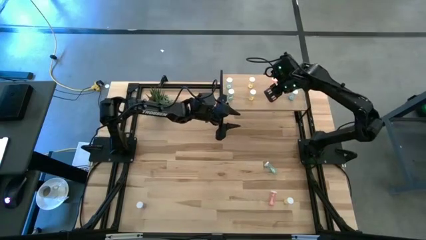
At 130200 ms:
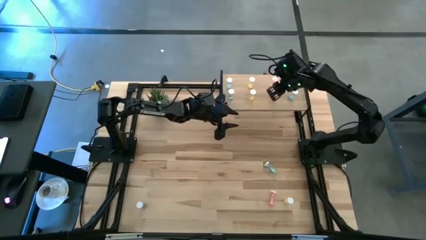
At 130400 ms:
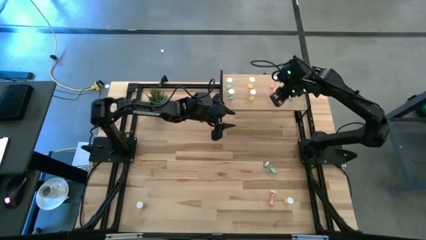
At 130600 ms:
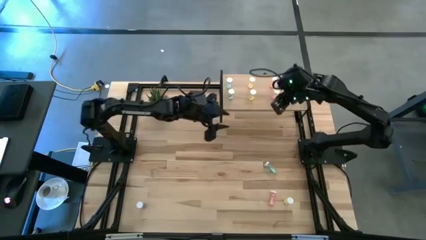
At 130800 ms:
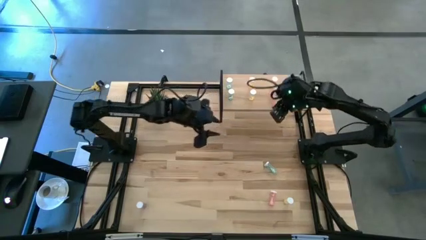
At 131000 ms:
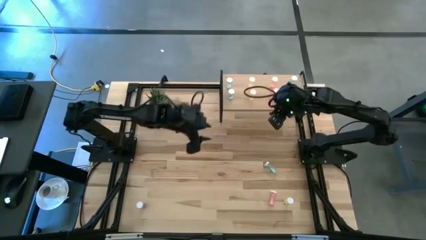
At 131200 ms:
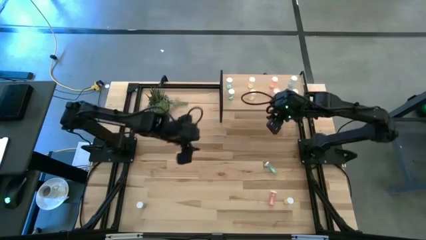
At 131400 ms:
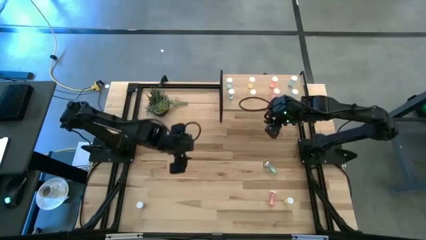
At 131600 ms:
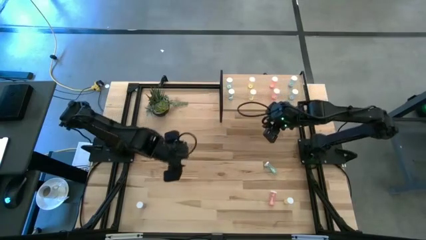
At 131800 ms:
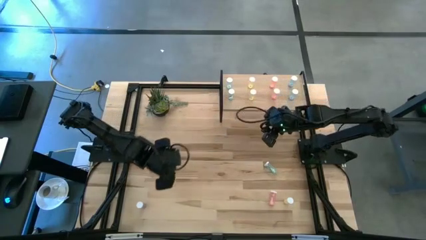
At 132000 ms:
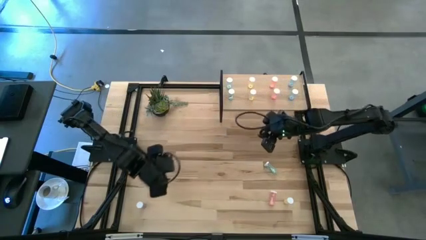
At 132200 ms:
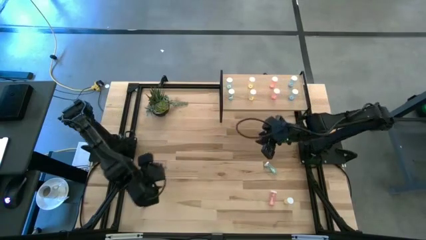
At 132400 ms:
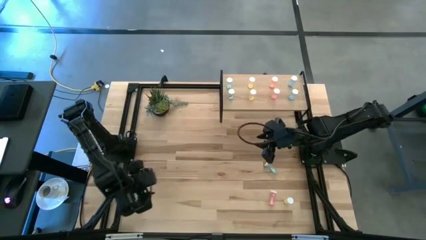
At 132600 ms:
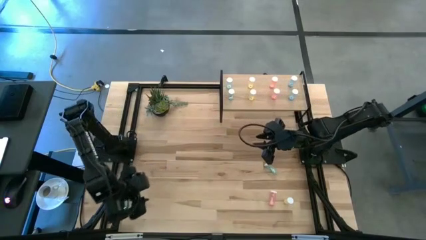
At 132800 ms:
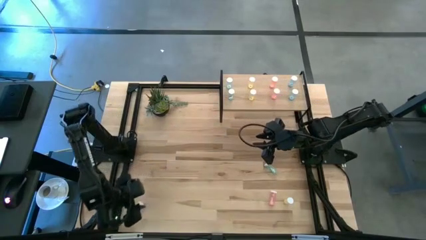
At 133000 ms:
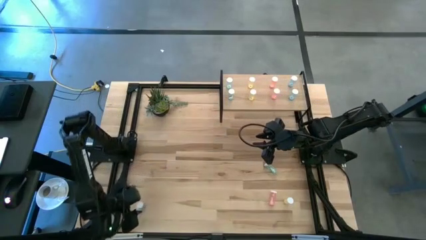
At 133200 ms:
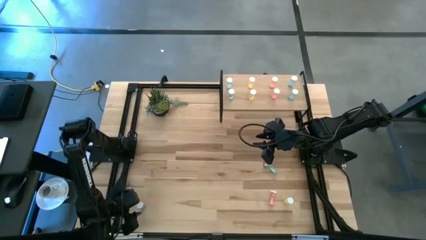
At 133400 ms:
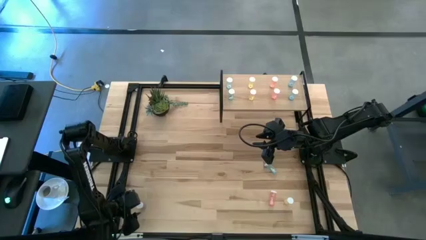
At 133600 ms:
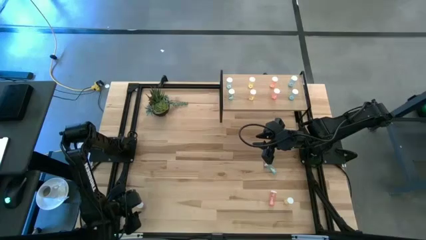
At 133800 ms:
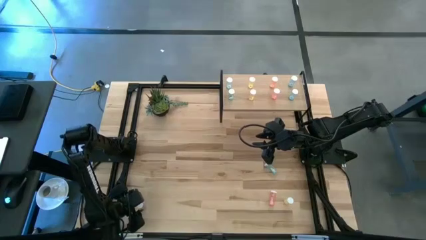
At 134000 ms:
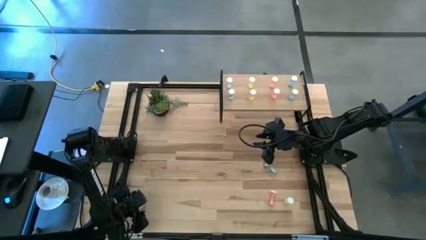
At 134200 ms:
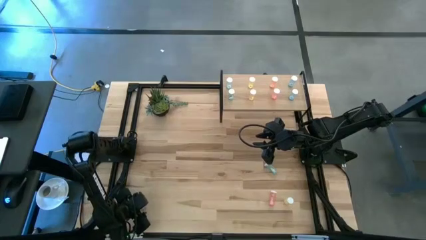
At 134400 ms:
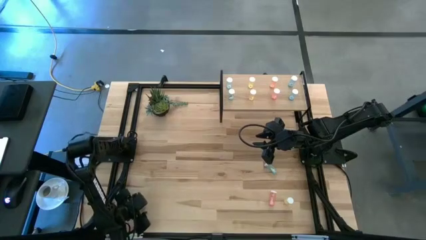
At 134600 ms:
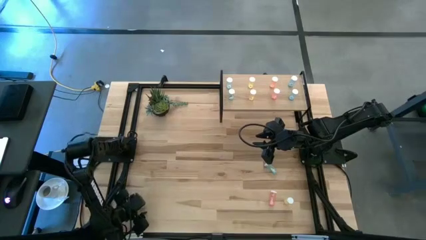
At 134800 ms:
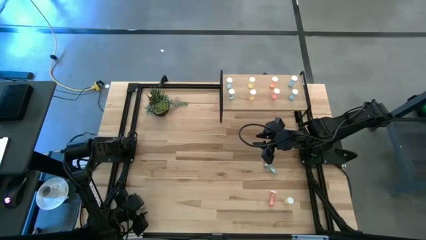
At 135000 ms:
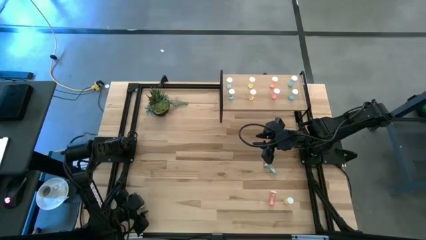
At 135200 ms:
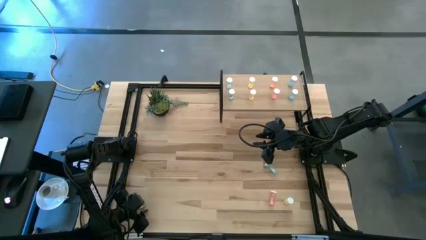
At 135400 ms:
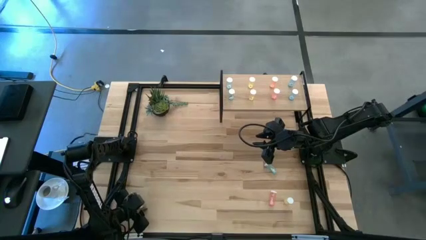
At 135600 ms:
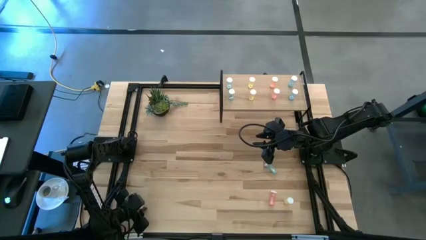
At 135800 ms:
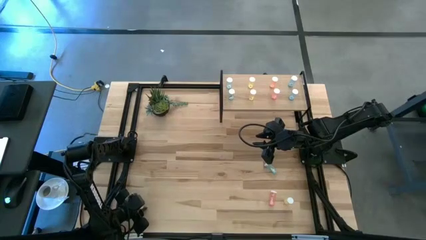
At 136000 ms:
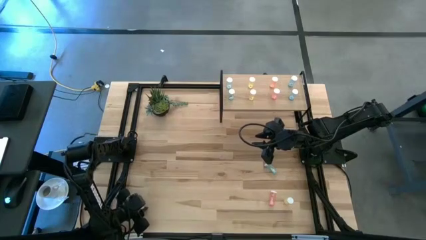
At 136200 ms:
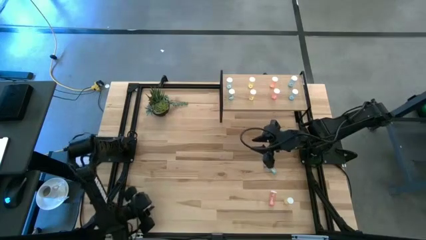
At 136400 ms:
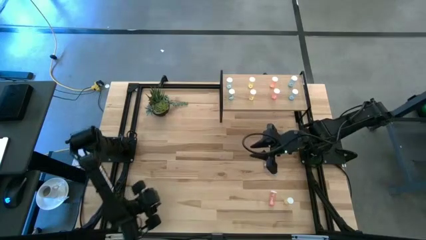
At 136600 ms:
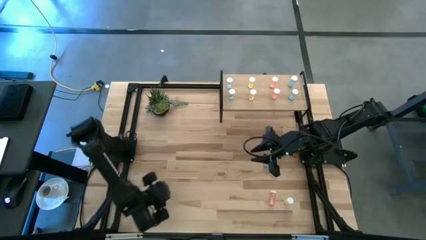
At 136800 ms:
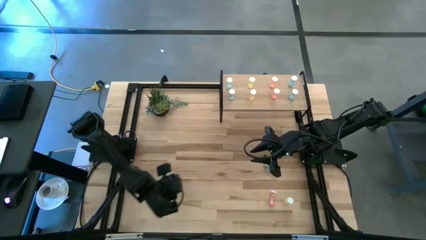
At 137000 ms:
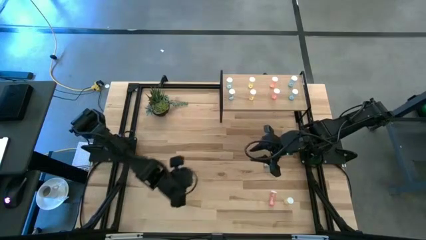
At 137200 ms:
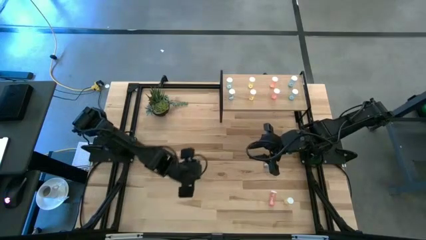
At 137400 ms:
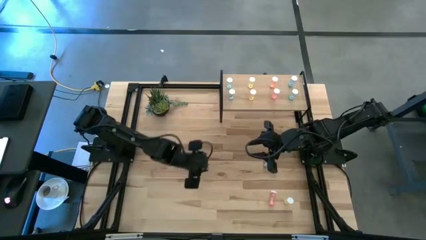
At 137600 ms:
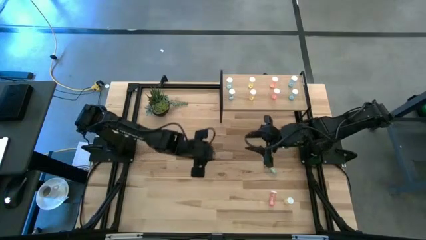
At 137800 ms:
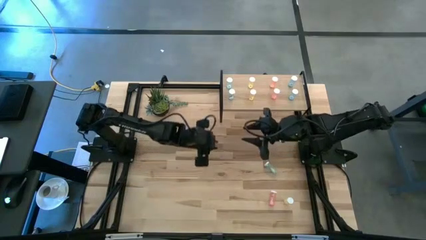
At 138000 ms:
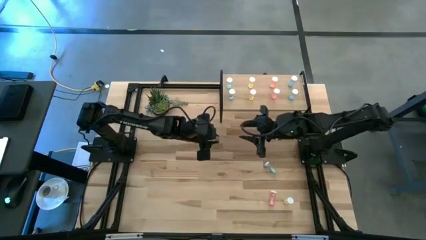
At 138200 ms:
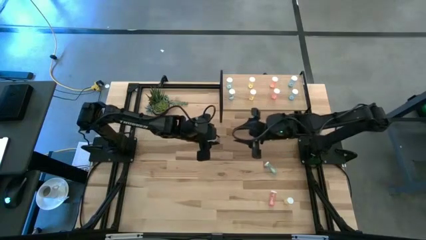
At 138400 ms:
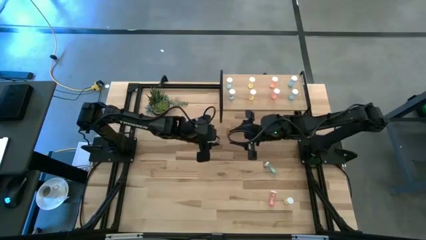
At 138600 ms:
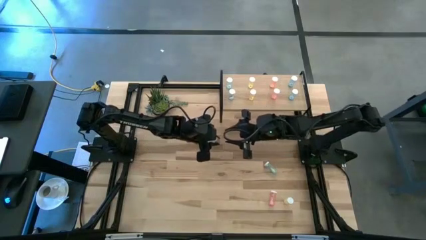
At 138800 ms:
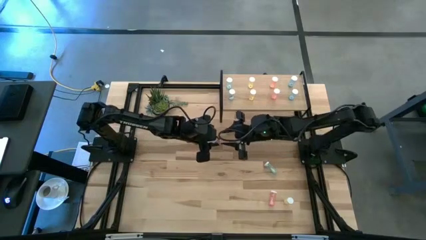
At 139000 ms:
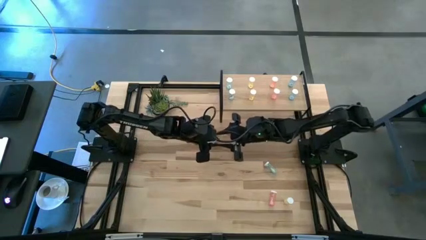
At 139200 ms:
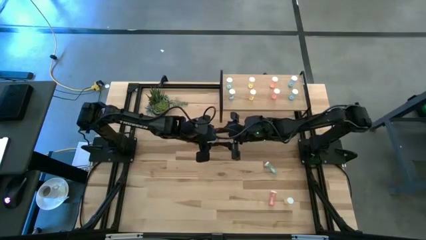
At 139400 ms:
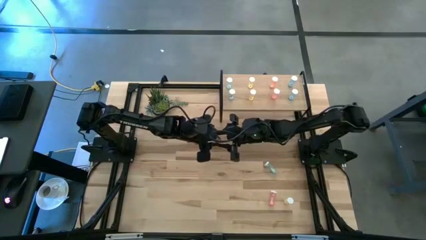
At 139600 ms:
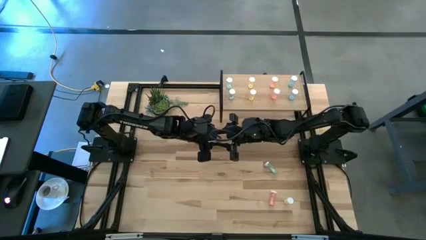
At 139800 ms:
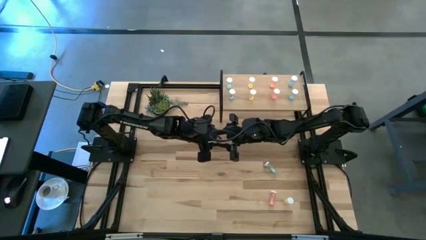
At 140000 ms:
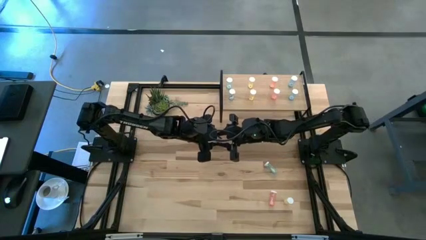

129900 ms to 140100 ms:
Task: Pick and place medicine bottles onto shelf by color
Put the blue pill bottle aligned with the other blue pill bottles on the shelf
